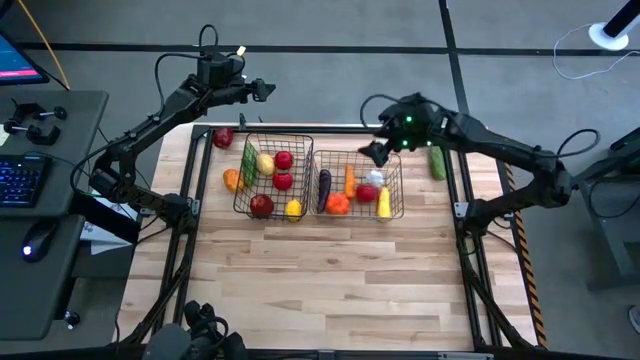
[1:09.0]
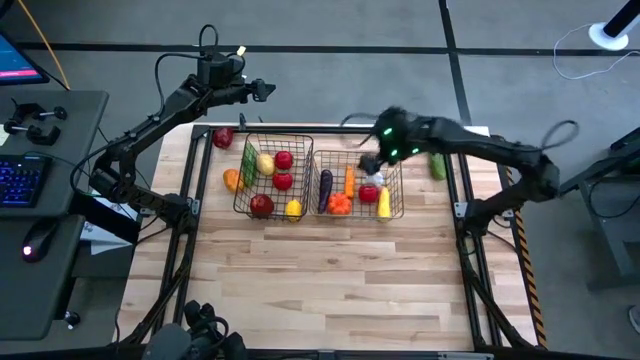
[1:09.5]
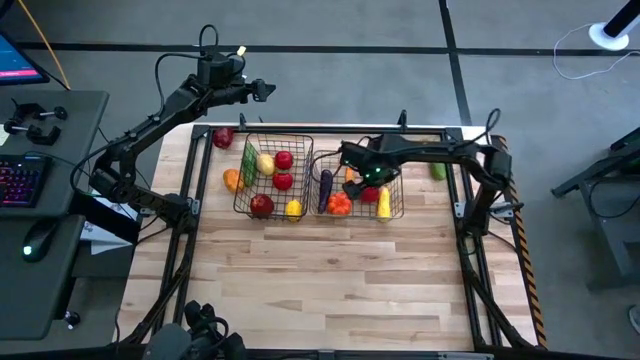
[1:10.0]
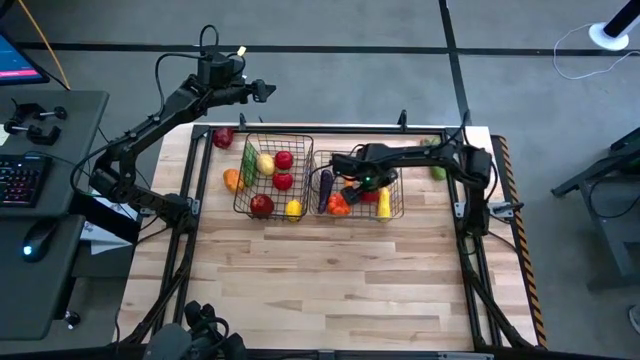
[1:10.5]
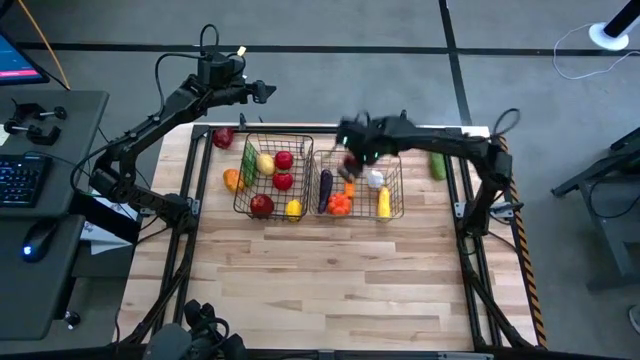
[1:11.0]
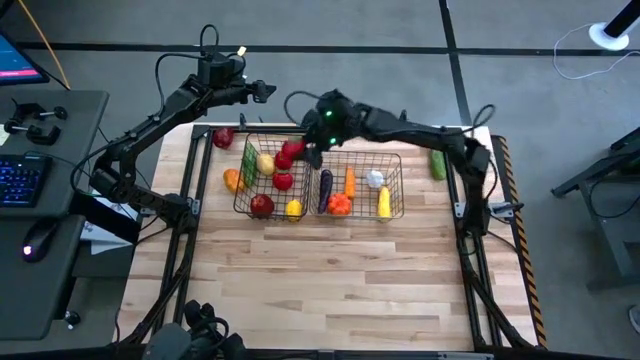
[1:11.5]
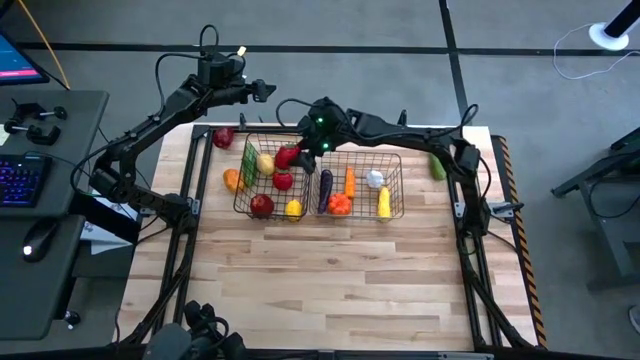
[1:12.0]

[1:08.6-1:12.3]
Task: Sort produce into baskets
Remove the red tomato from the right wire basket to the left wire basket

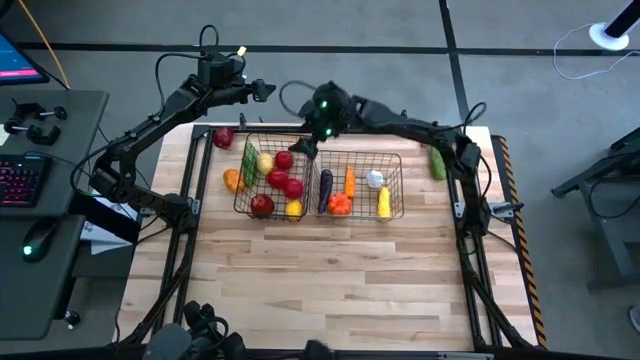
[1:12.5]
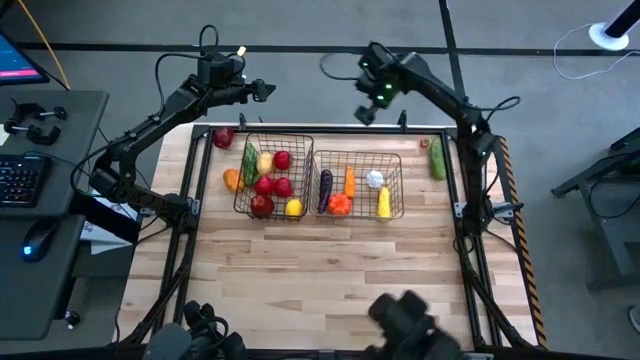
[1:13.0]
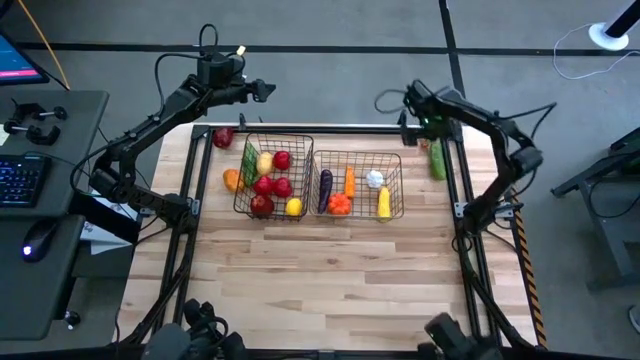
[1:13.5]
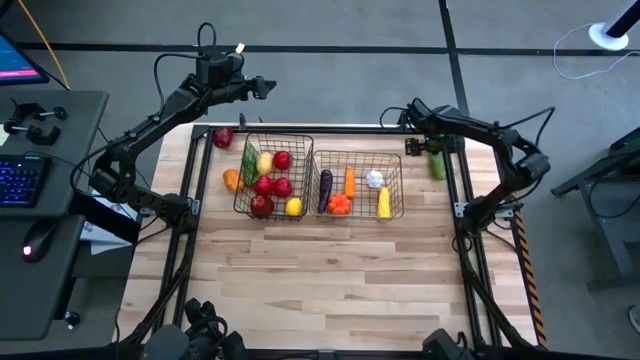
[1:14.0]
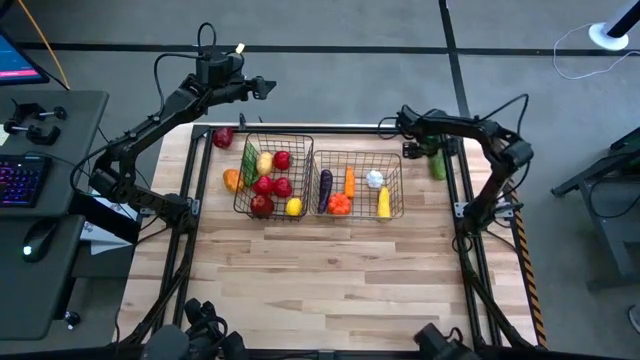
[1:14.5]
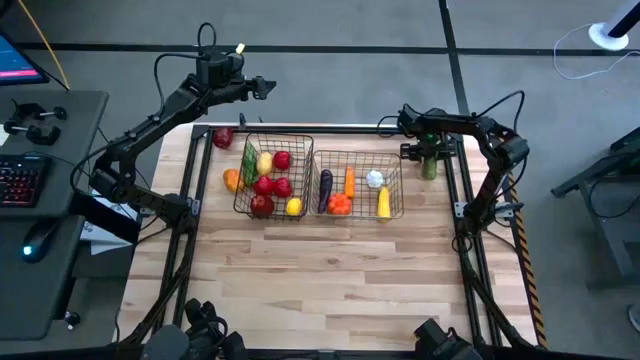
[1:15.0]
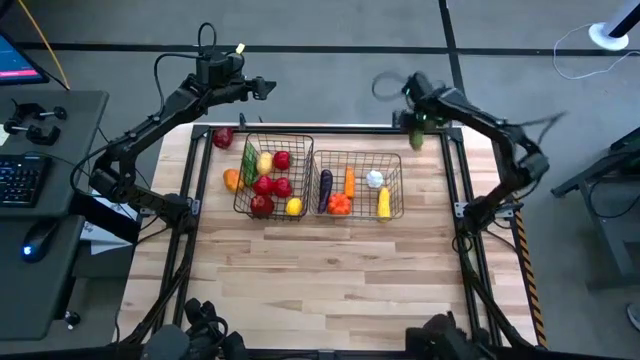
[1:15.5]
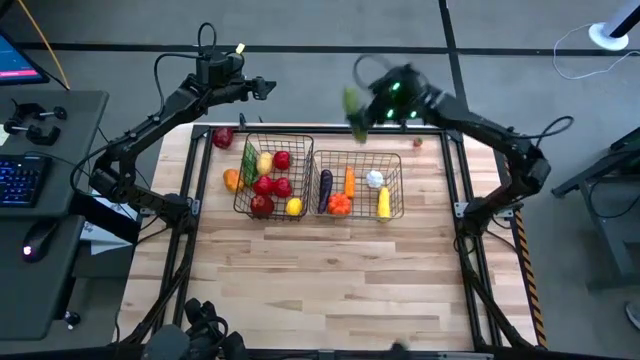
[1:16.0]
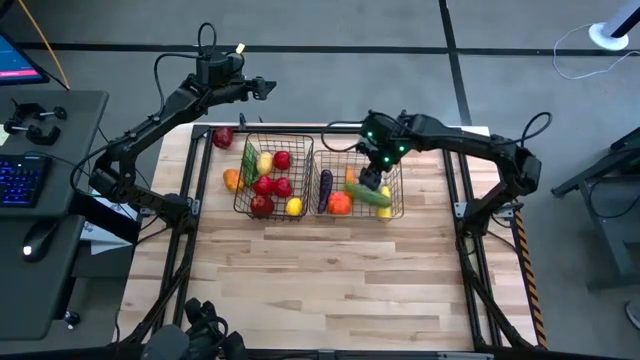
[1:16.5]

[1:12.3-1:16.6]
Put the right cucumber into the right wire basket

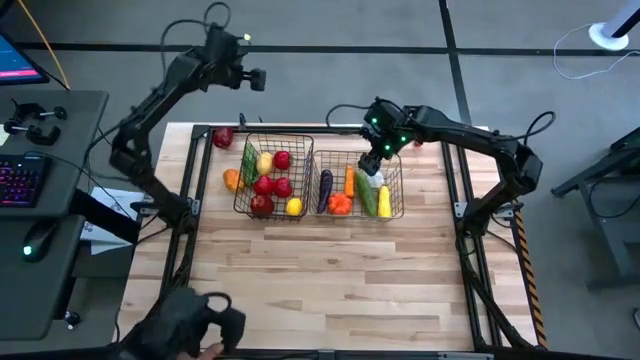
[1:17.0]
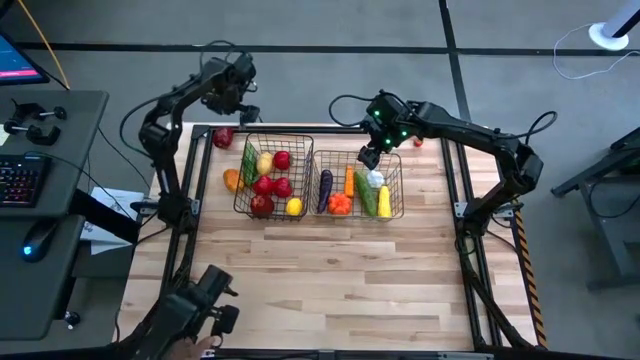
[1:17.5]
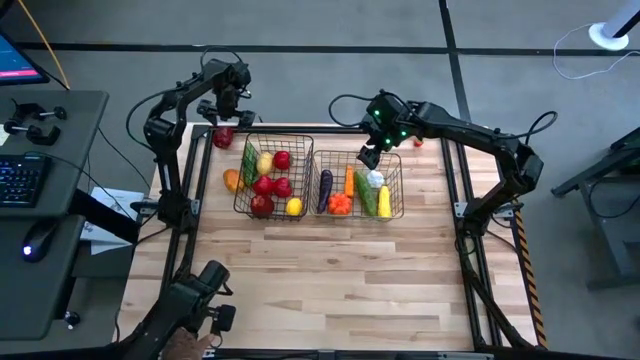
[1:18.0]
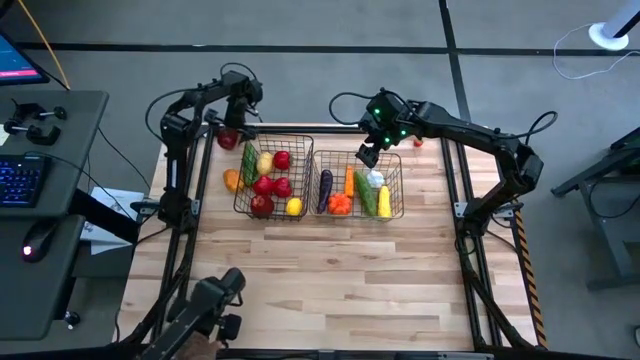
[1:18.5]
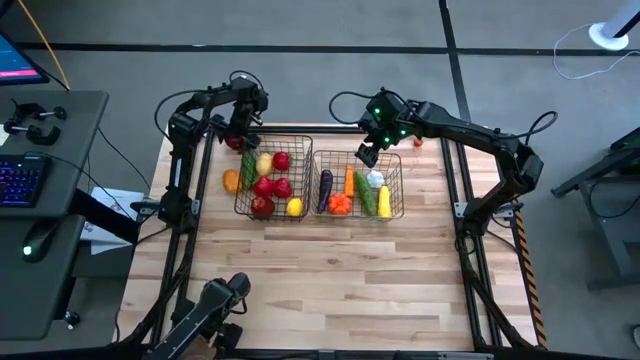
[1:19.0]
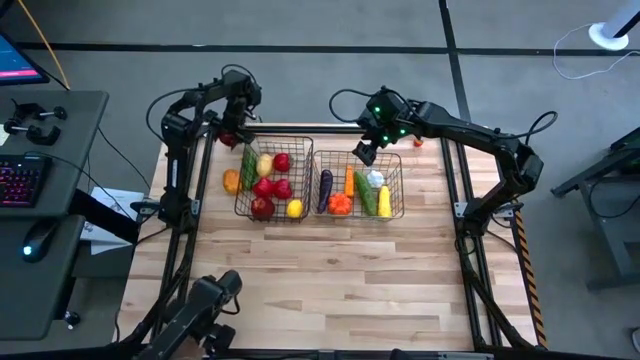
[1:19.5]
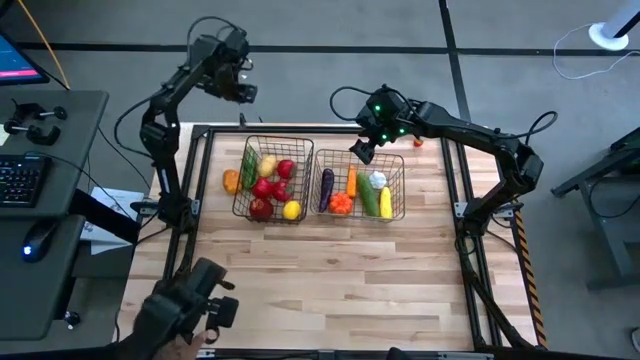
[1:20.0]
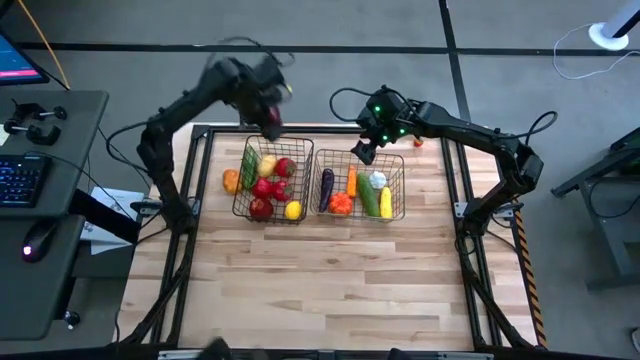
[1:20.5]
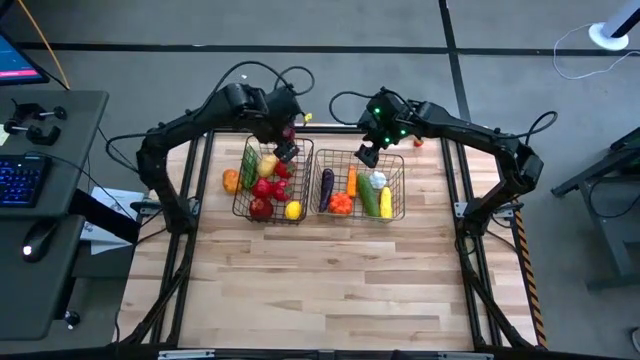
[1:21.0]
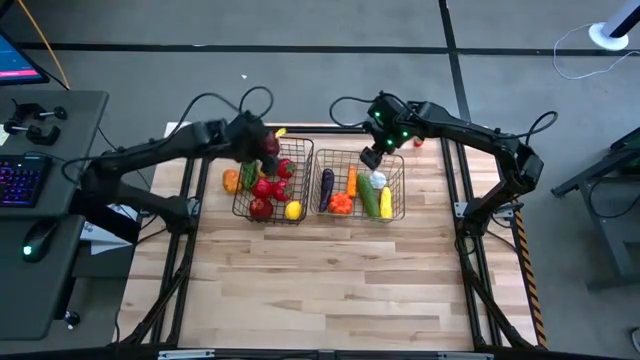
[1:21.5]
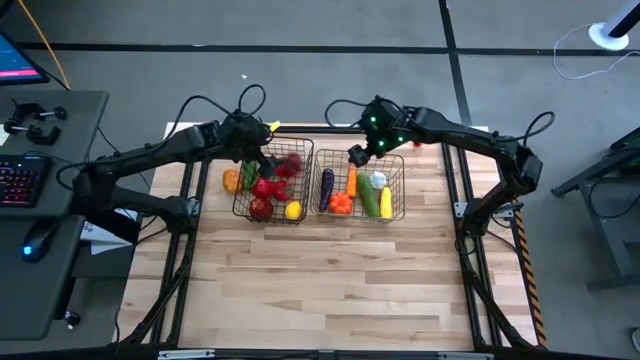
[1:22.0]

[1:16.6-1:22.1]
Put the apple into the left wire basket

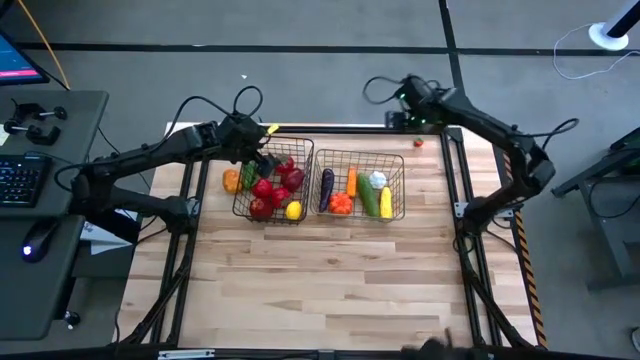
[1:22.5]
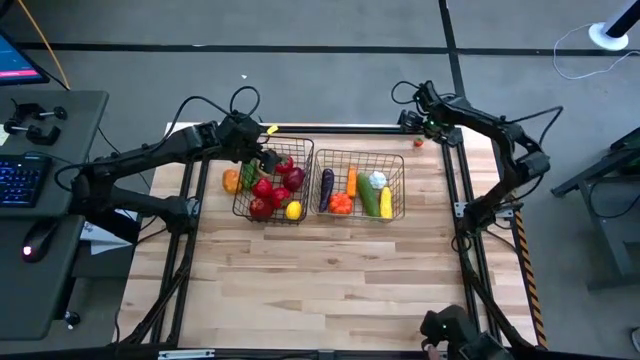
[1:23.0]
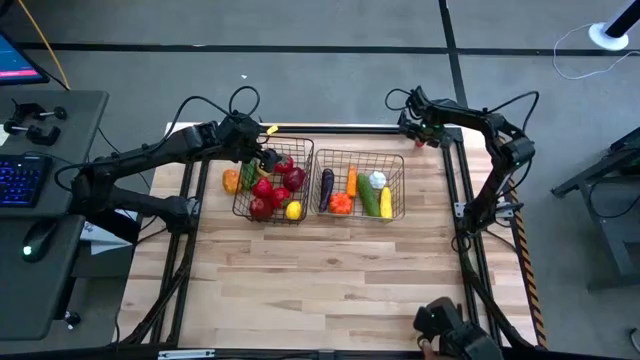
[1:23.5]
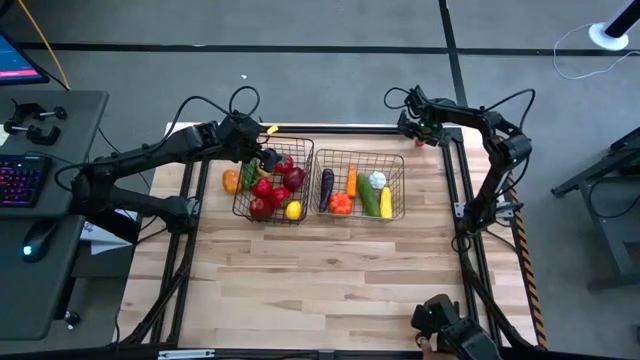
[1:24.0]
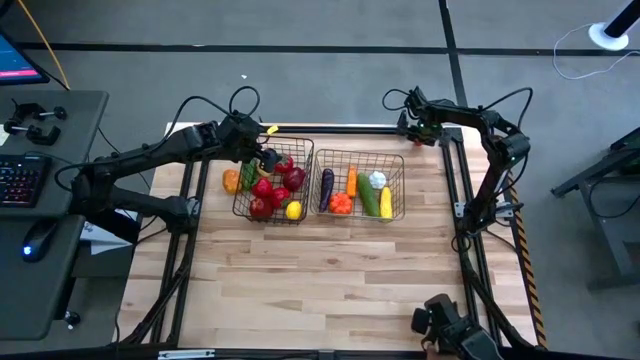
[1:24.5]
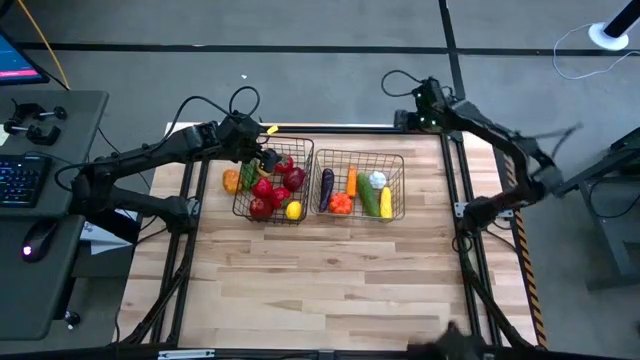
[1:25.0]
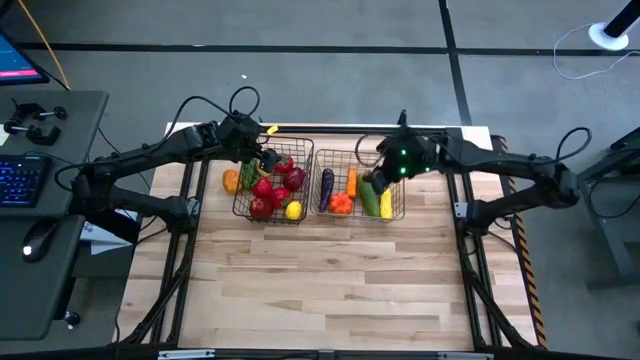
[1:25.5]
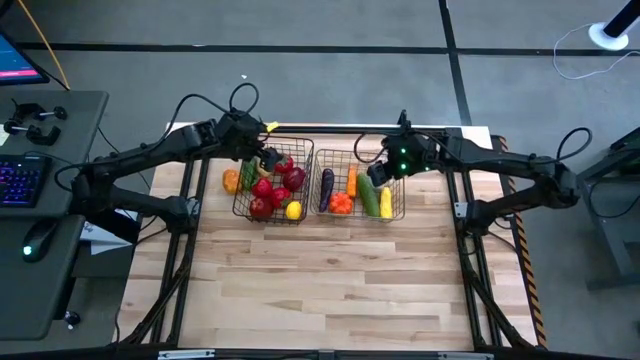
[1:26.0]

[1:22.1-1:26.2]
Put the strawberry into the right wire basket

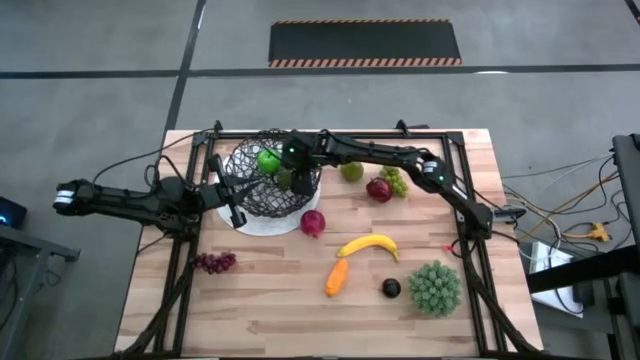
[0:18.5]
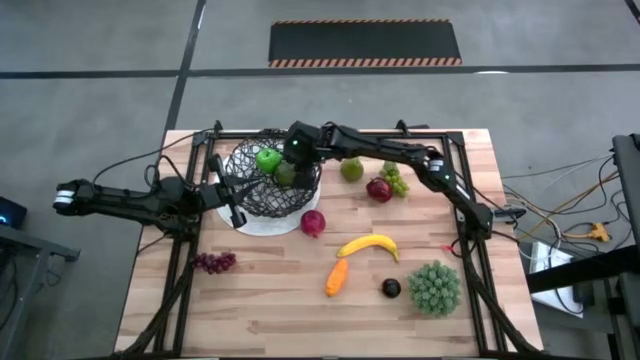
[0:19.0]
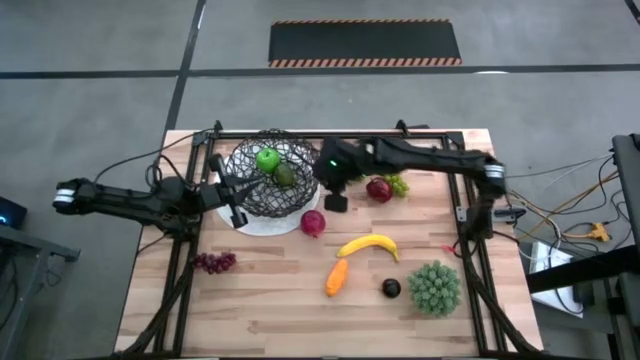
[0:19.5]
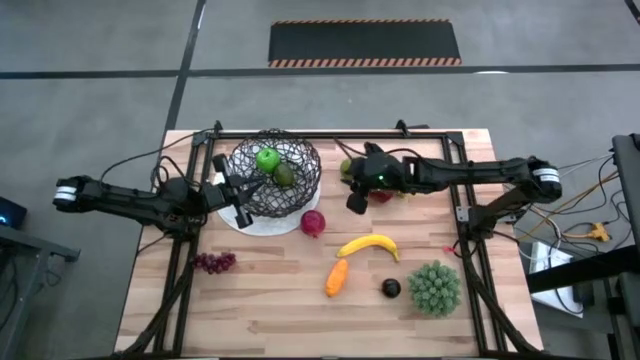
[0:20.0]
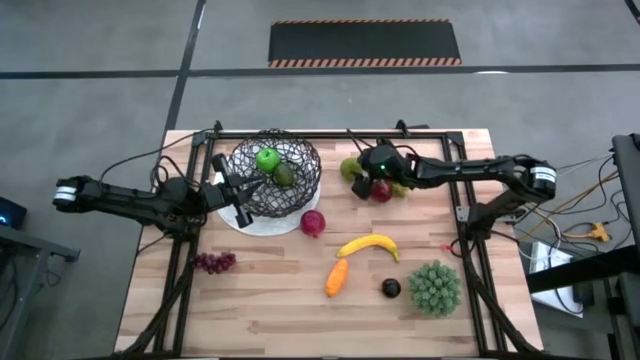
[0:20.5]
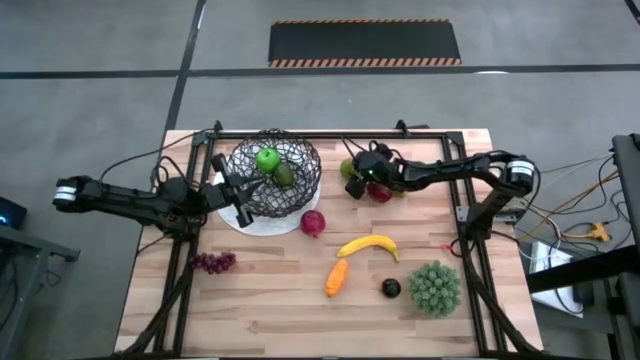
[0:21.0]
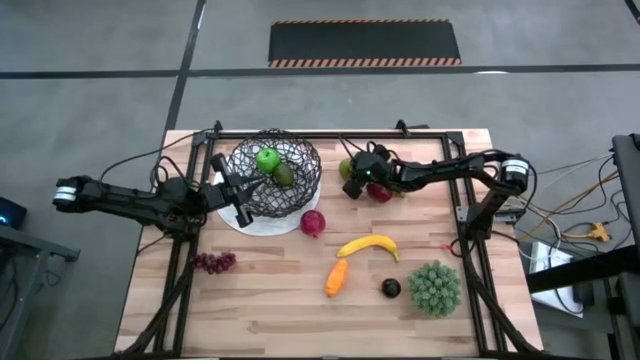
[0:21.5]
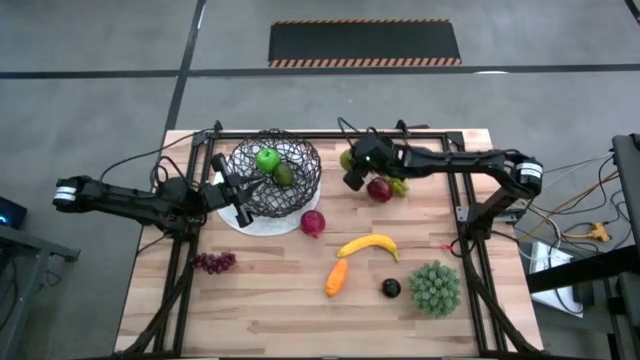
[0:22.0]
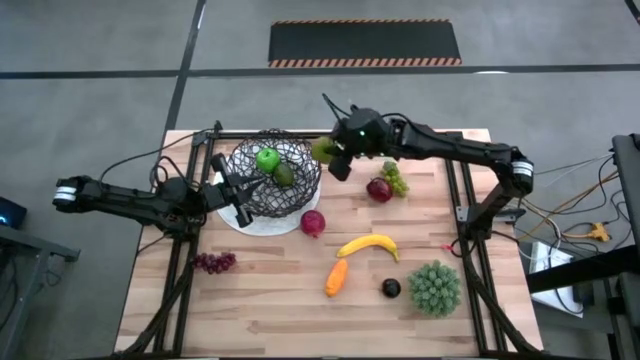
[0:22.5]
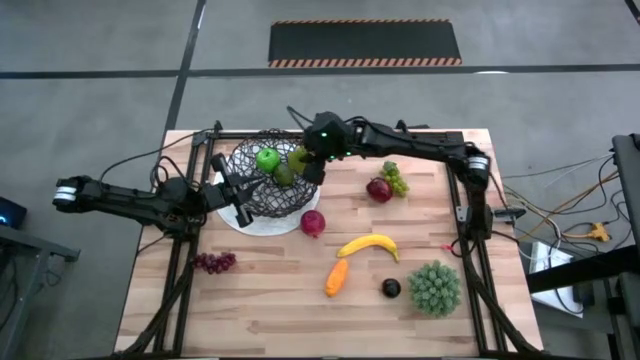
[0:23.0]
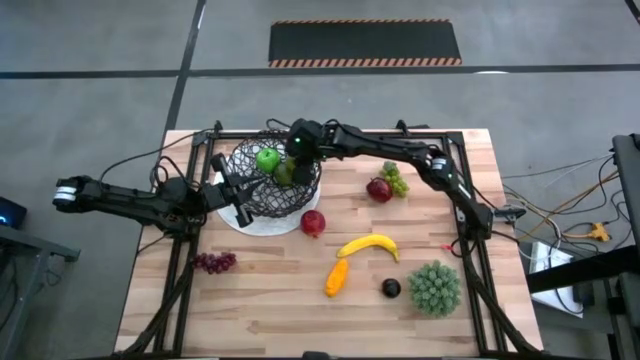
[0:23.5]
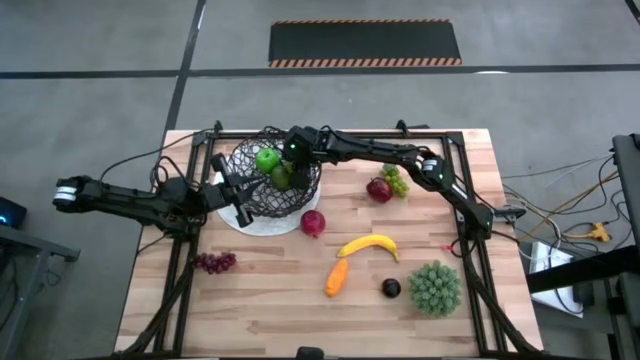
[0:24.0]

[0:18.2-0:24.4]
Task: Build produce basket
Put the pear into the woven basket
